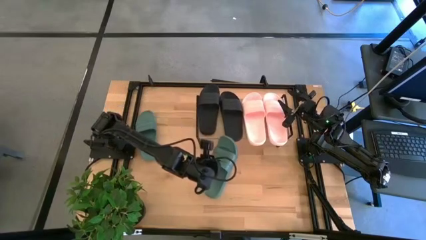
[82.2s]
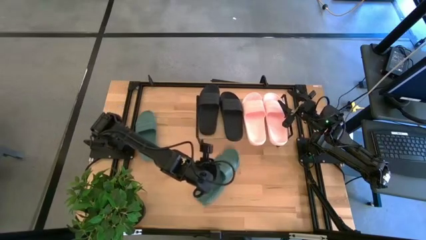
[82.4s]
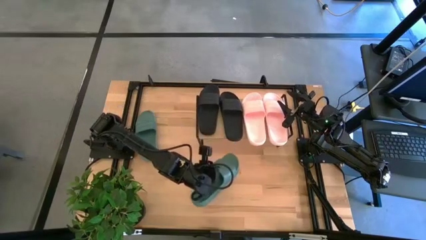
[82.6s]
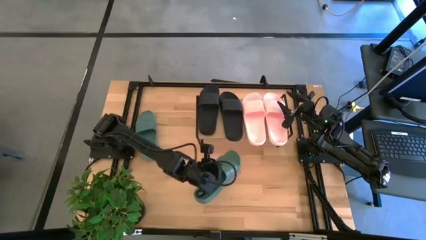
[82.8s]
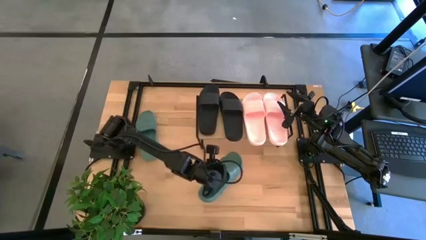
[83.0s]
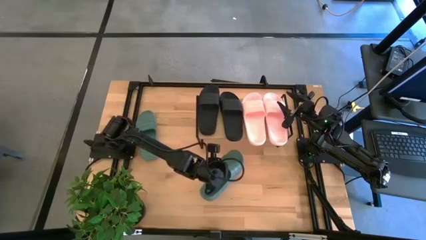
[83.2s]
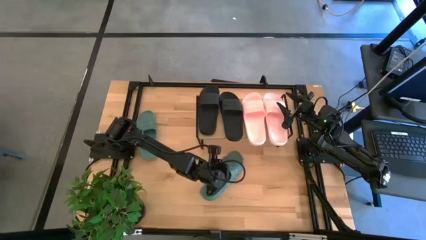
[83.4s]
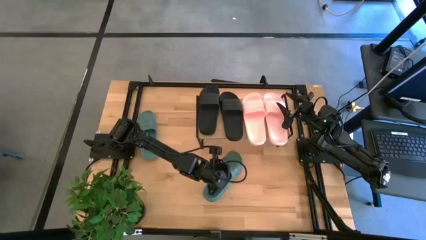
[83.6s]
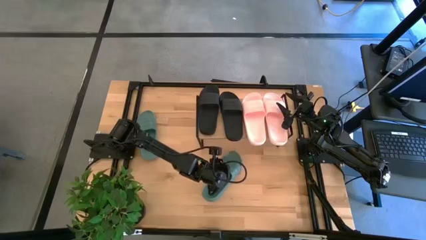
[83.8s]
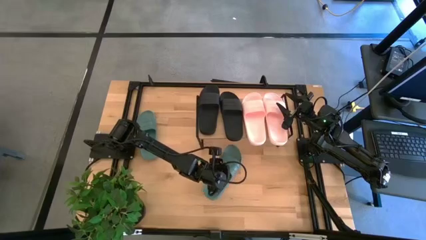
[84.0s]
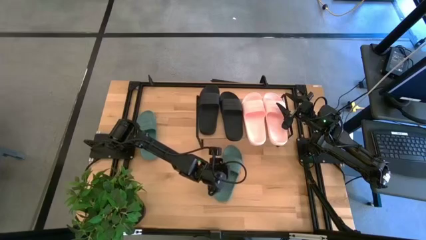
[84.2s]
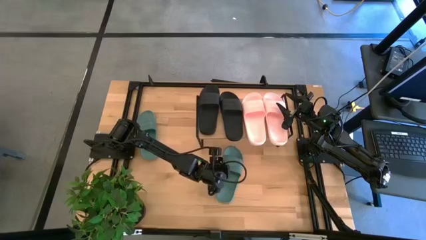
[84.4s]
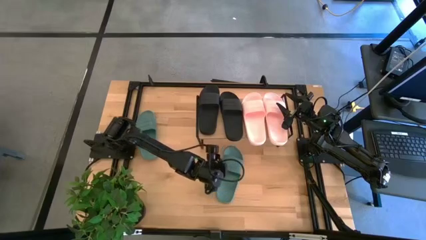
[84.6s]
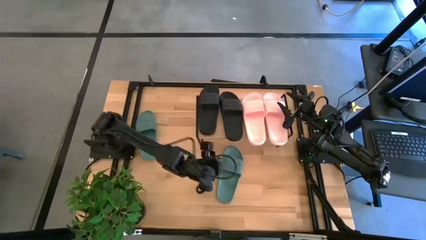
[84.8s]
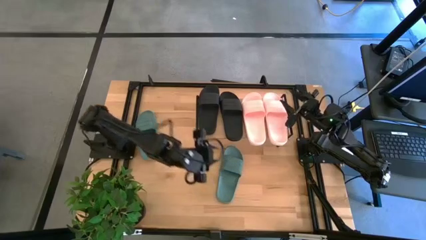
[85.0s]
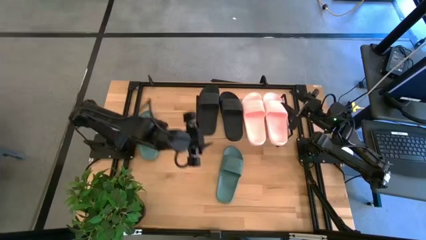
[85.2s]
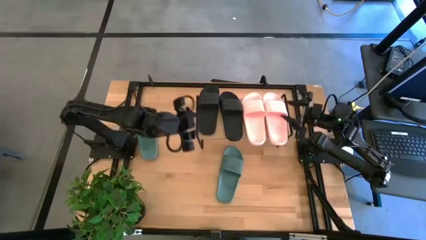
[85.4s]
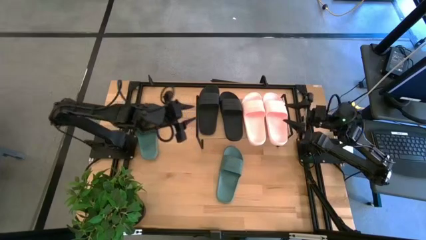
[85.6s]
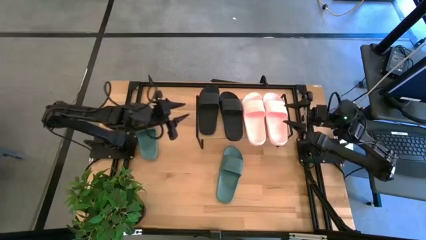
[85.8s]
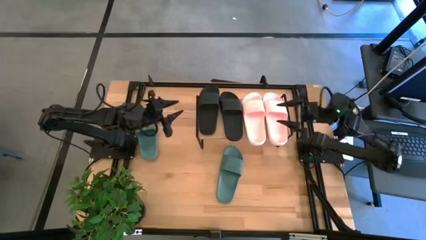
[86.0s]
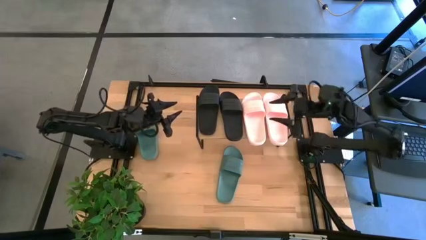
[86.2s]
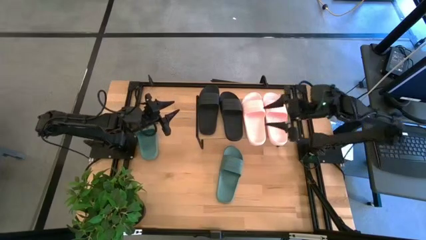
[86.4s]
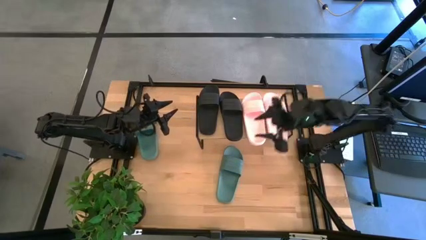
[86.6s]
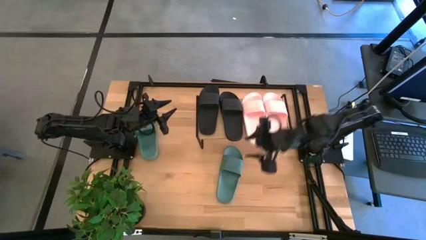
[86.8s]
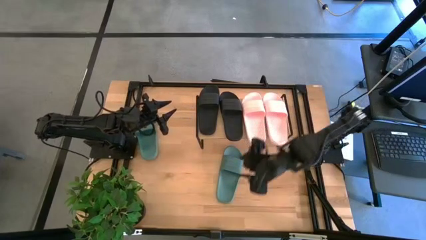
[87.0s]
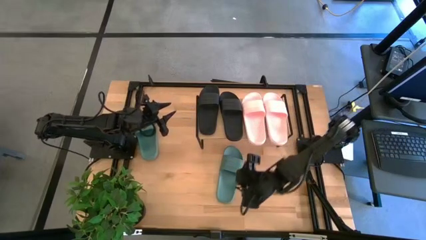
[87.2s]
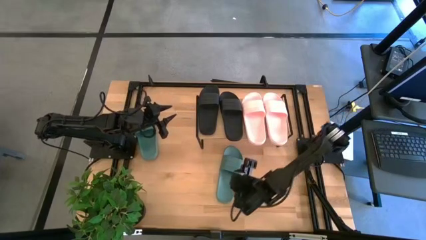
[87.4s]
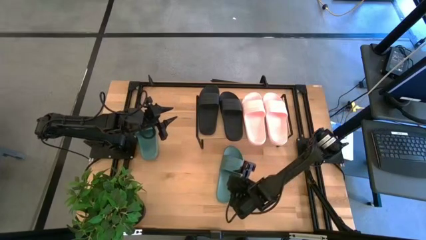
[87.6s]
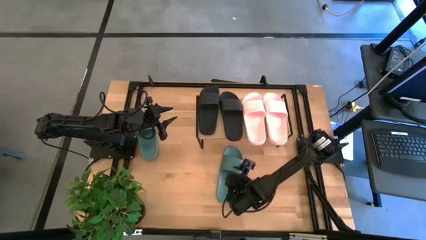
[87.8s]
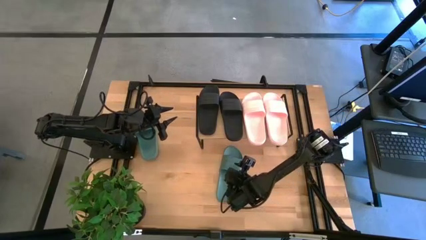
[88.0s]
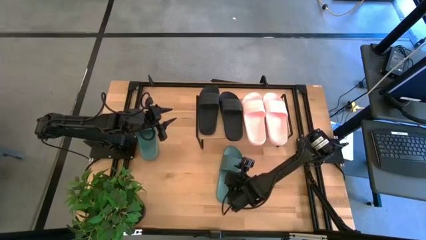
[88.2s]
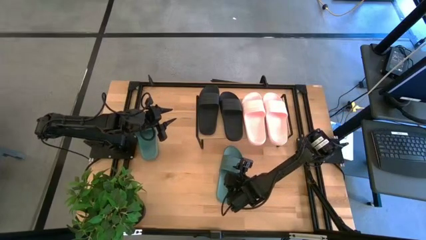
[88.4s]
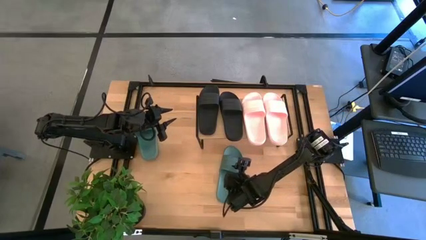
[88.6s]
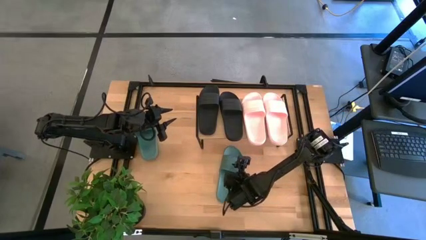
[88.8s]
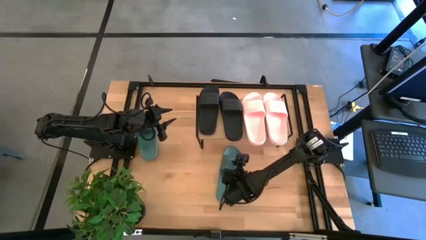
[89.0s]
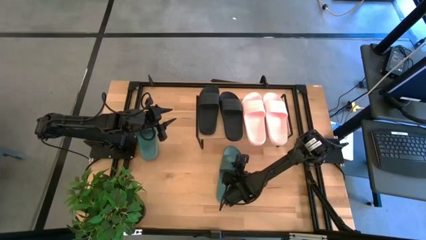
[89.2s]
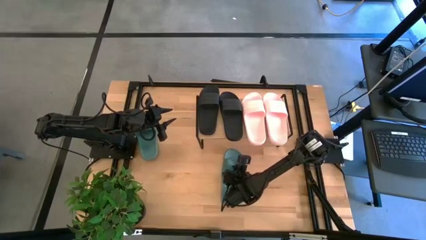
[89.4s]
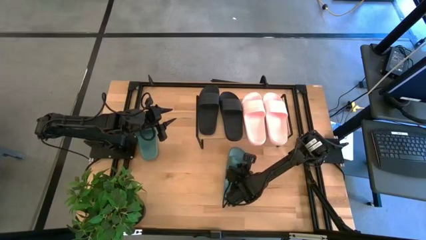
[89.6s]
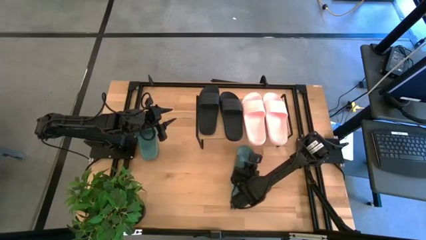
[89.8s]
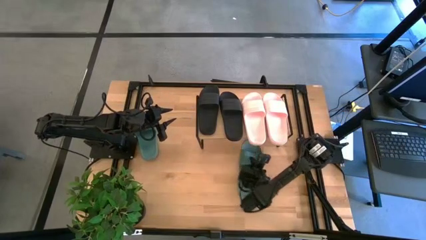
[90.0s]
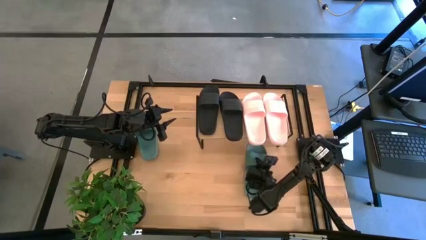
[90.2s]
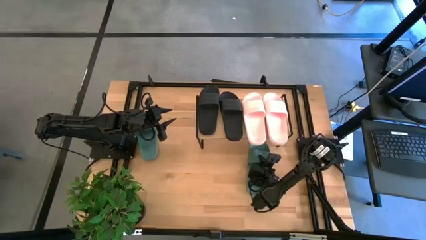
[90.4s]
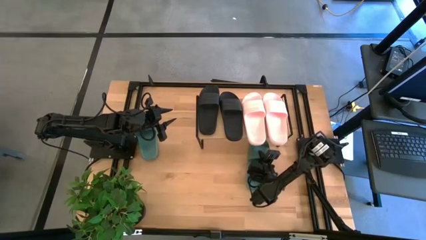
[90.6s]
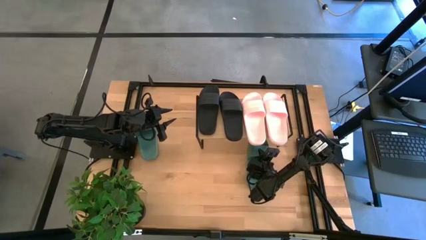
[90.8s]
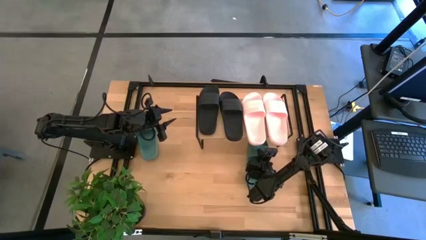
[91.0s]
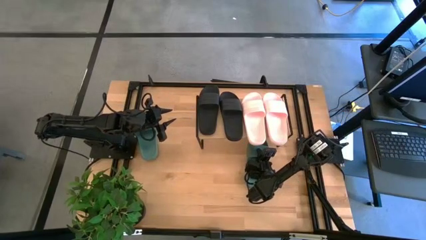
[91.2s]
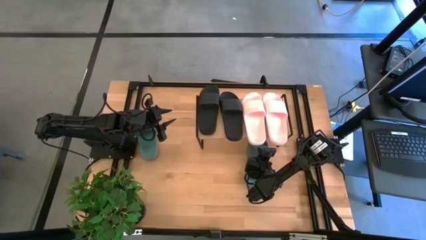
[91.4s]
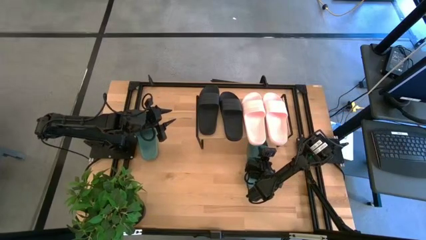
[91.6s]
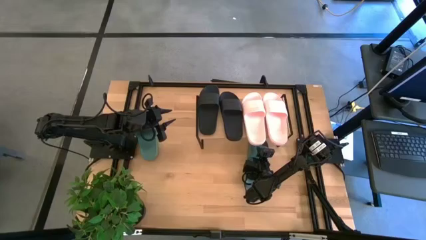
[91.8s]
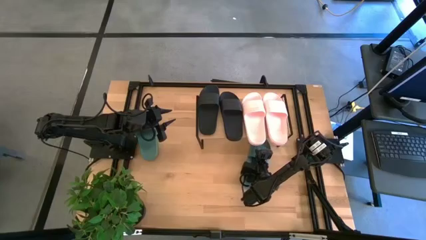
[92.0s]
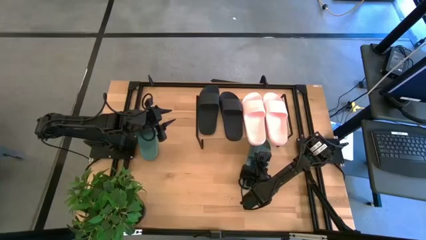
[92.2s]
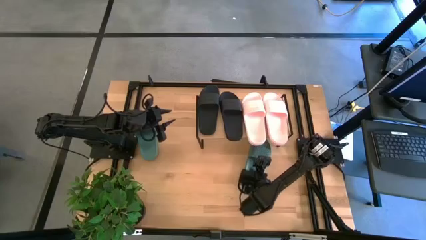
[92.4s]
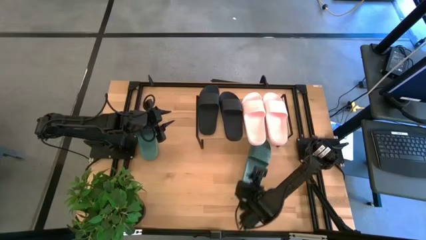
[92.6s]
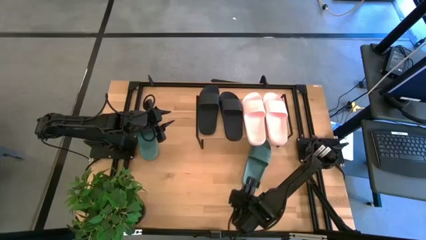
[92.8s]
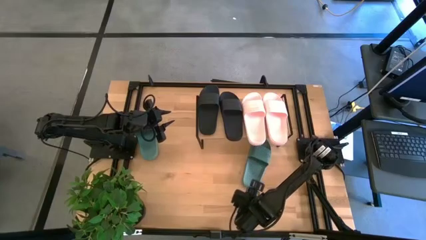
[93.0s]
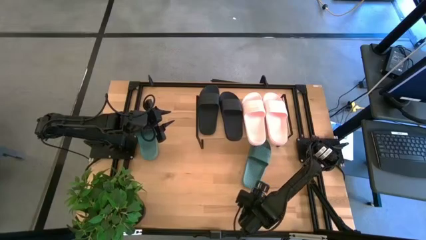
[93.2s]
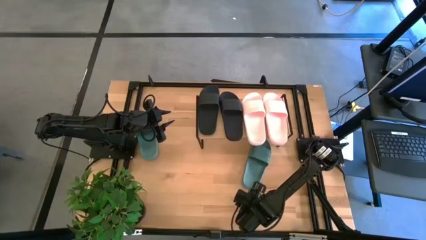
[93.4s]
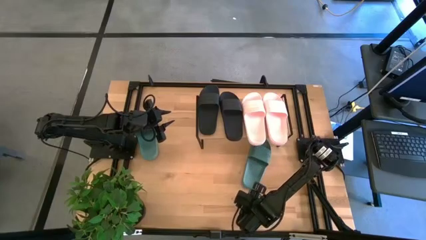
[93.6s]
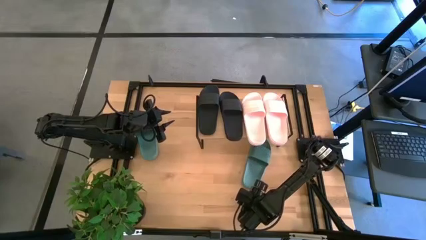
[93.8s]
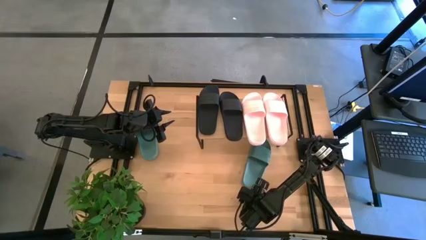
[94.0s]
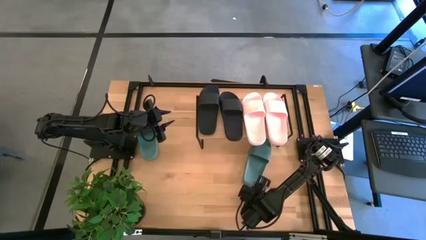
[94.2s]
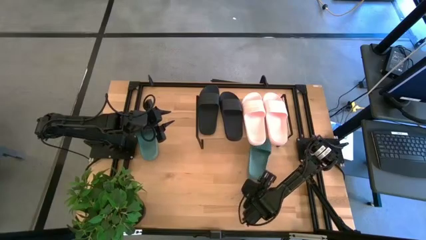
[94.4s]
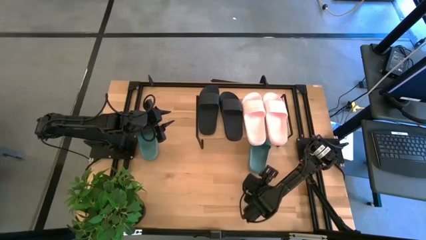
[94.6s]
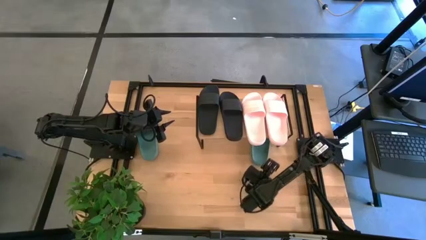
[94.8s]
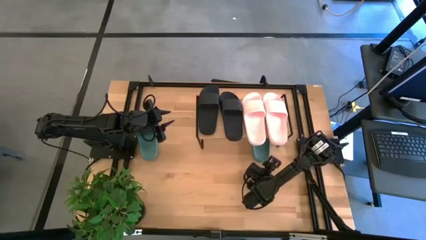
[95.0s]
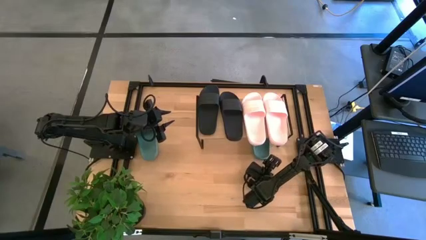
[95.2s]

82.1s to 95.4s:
Task: Pick and place slides into the shelf
Put the right green slide under the shelf

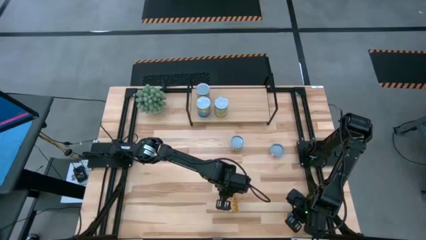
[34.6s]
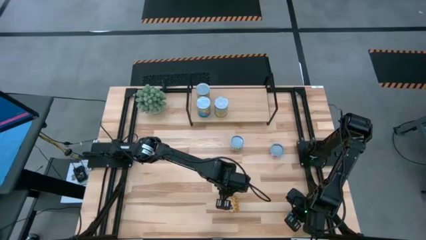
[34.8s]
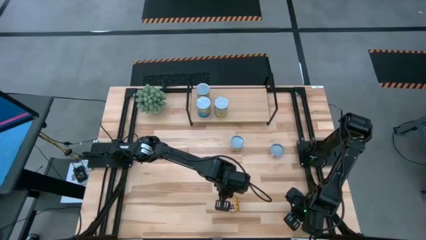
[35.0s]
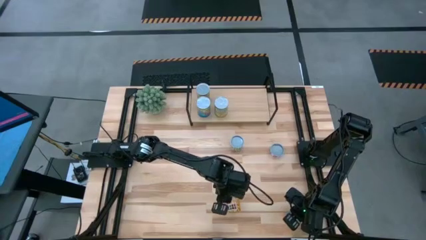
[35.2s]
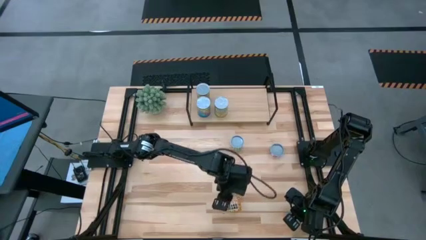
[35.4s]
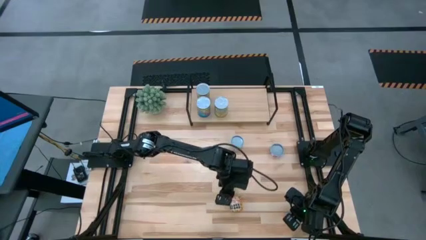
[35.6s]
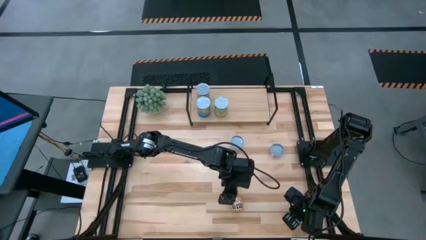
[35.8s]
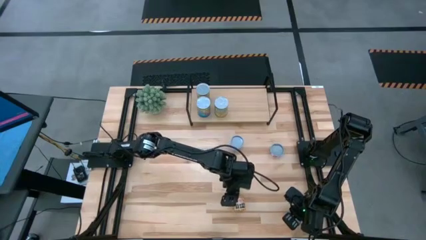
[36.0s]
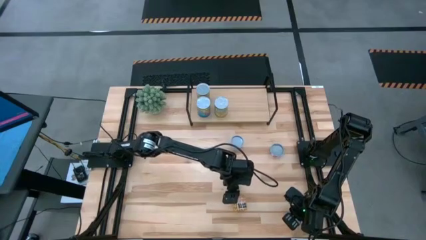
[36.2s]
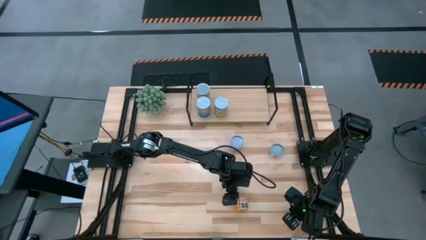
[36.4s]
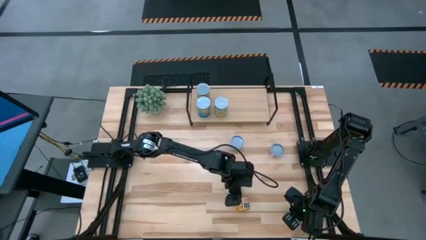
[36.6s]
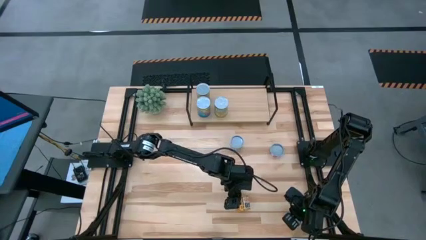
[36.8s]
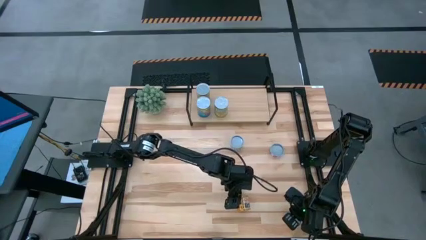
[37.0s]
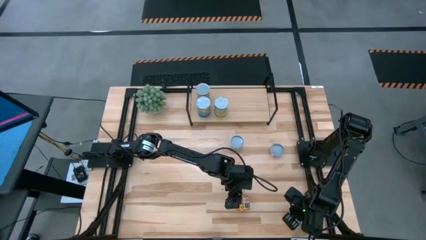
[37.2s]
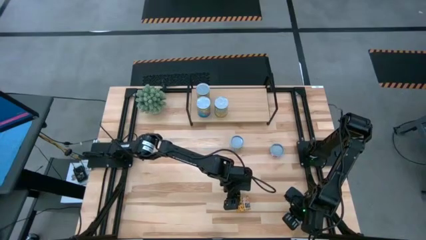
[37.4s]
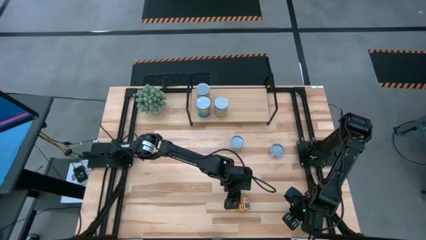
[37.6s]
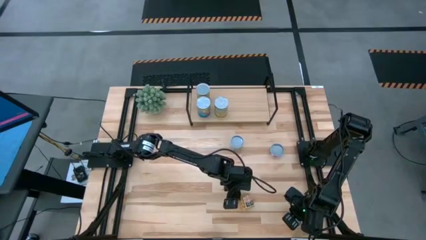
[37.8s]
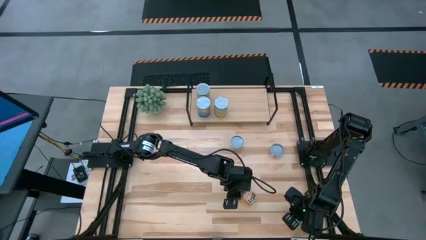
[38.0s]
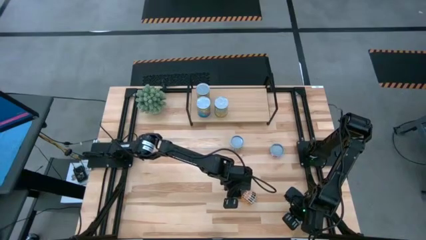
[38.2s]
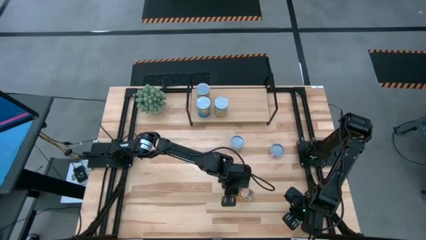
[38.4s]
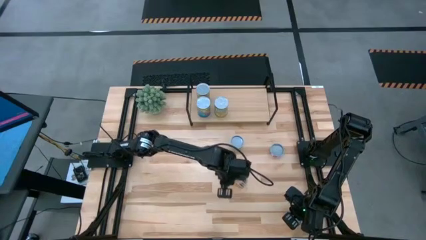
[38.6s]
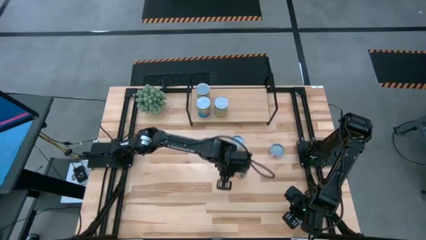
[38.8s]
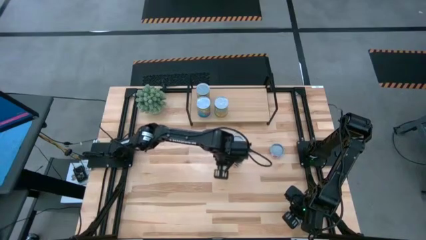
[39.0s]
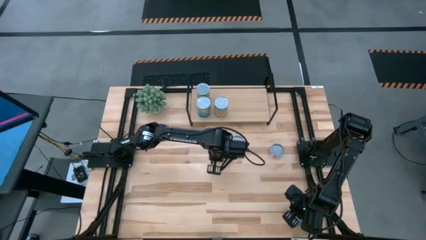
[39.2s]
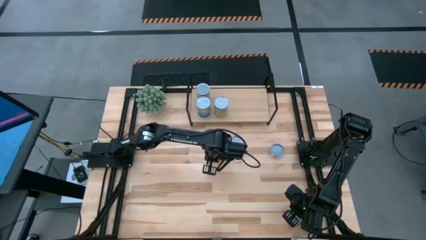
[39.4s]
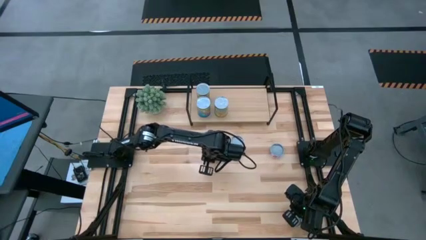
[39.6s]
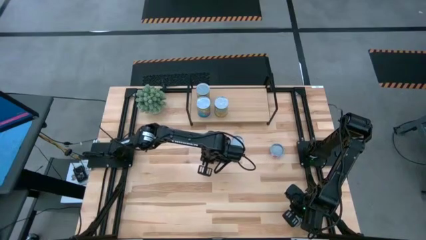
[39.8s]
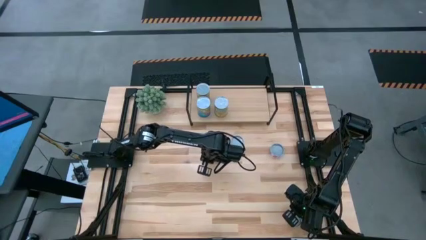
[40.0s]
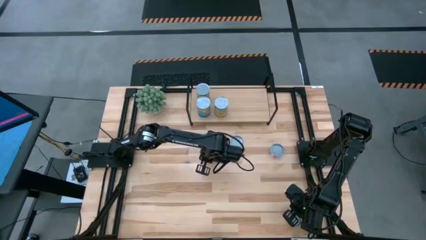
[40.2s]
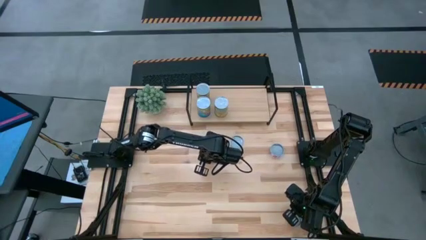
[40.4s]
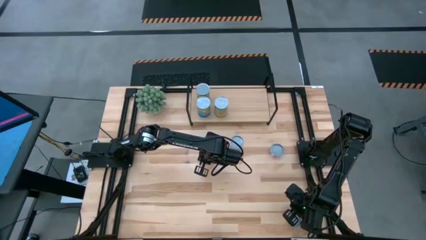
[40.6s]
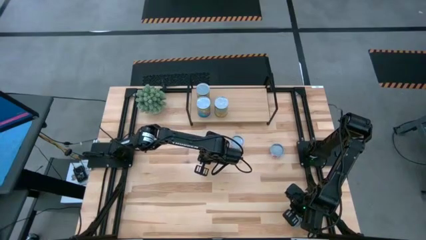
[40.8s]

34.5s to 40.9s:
Task: Pick and place cans onto a shelf
Move the canned black beans to the center of the table
